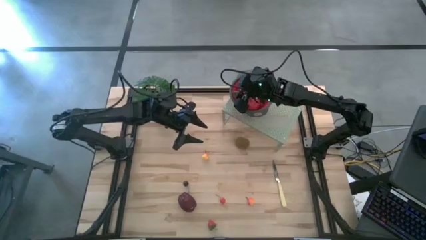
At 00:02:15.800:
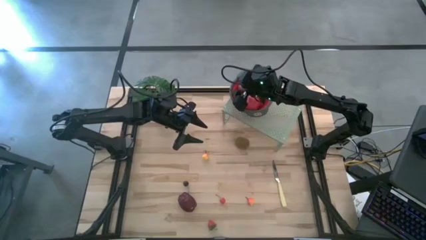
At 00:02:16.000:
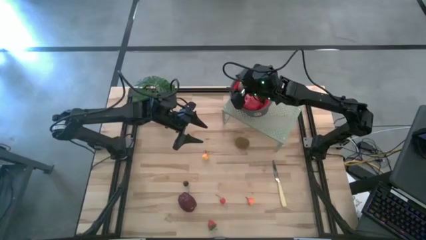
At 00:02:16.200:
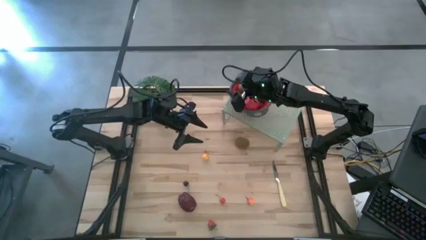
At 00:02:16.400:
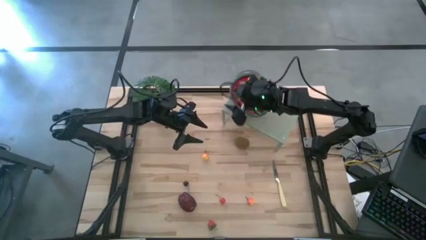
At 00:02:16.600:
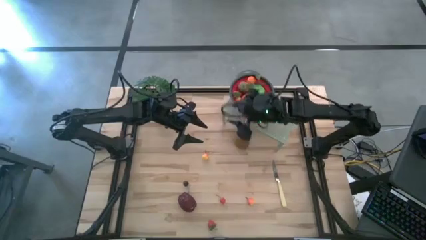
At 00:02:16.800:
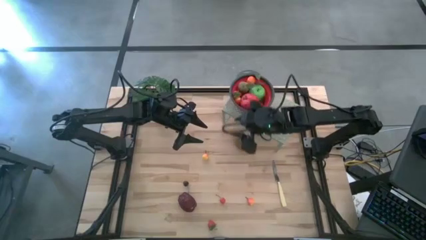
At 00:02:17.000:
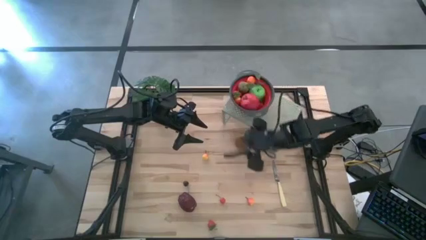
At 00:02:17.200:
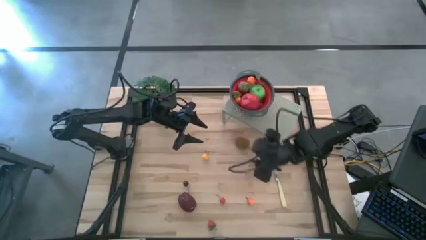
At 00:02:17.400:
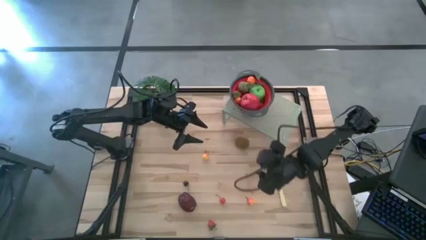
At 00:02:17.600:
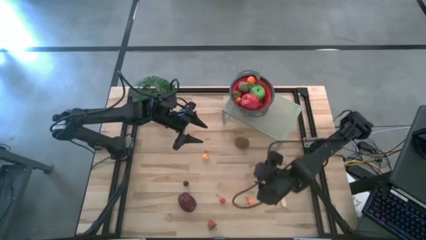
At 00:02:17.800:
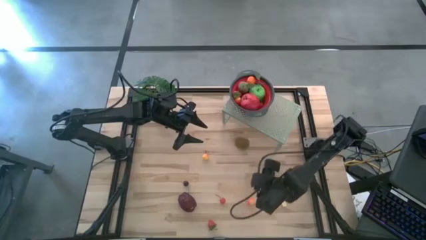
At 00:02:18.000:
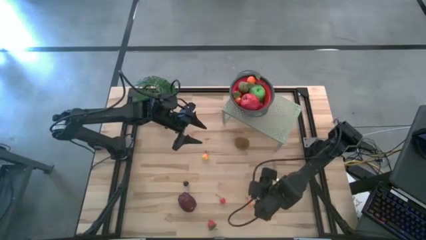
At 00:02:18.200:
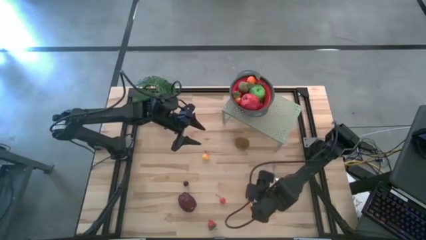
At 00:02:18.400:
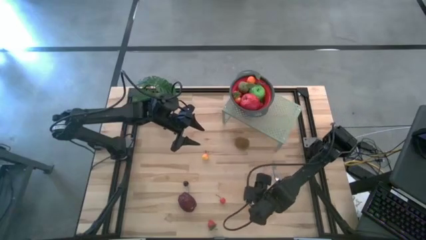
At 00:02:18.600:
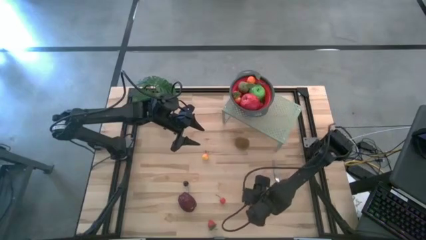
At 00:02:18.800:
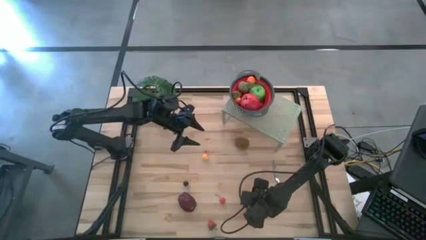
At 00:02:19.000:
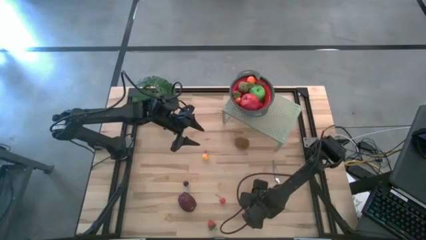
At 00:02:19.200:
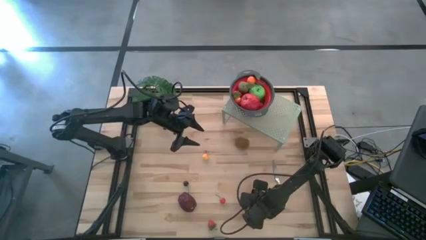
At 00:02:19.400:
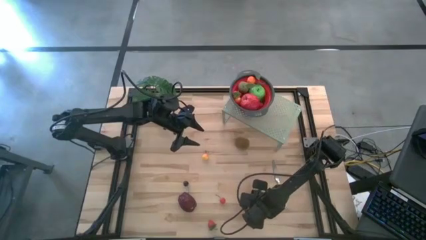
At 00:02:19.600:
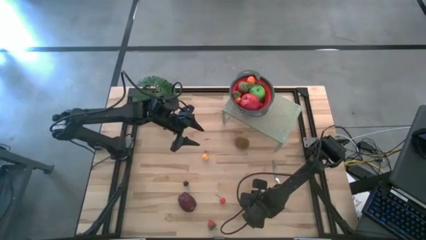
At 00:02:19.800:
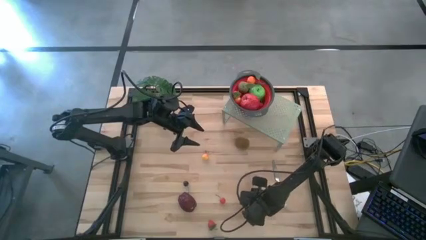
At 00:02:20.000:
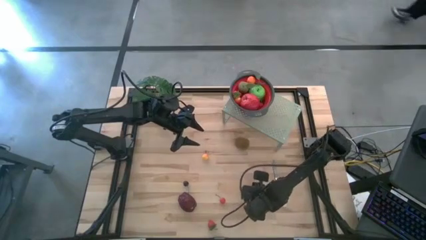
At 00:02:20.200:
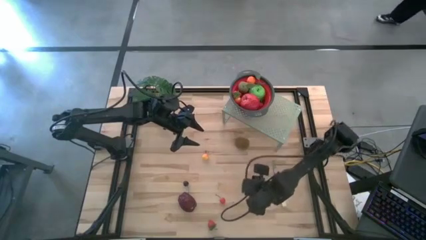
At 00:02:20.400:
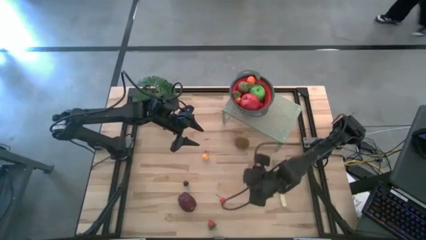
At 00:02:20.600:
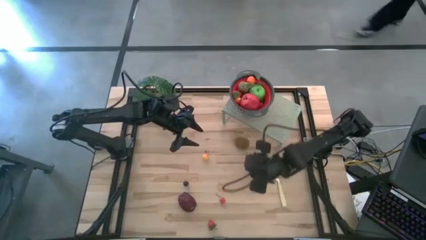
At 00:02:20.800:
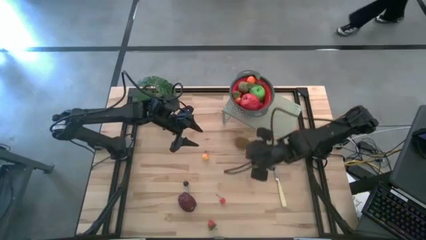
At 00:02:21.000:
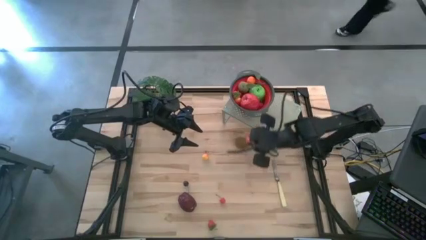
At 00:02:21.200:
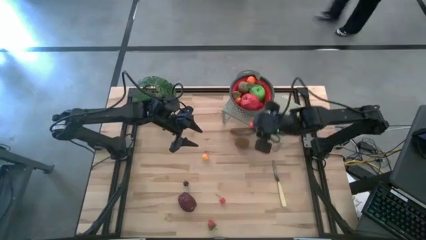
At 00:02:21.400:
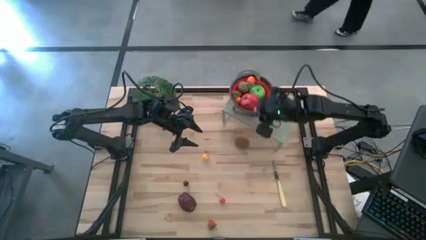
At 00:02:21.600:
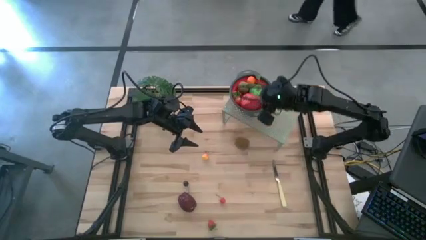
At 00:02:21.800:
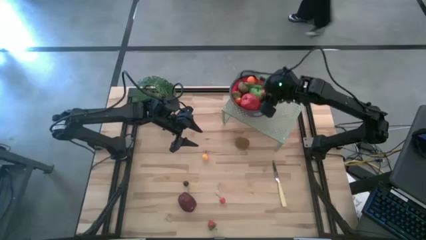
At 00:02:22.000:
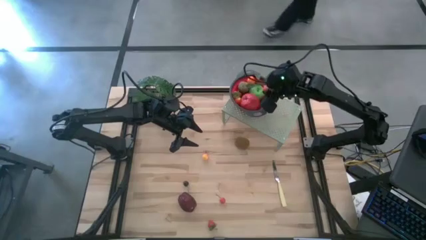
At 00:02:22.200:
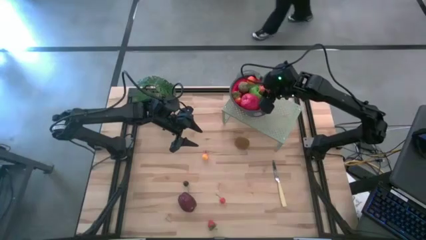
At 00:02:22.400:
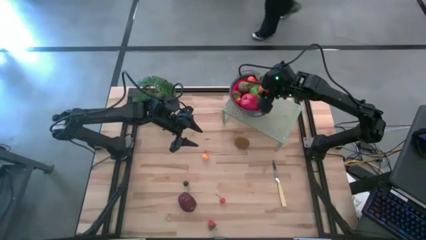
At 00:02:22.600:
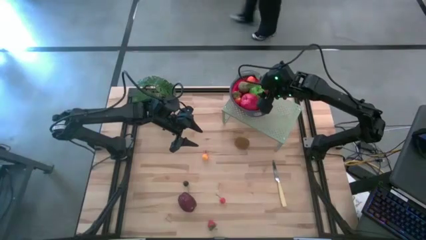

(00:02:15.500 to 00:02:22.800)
Task: Pick & Place Fruit
Put the yellow pear into the red strainer bowl

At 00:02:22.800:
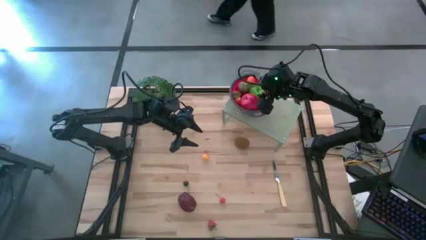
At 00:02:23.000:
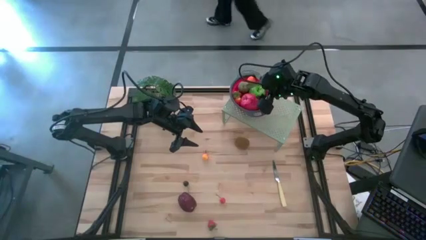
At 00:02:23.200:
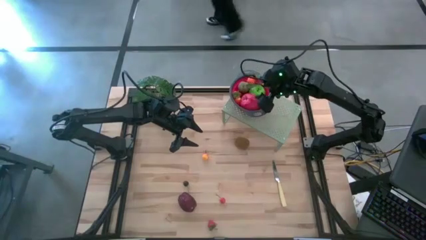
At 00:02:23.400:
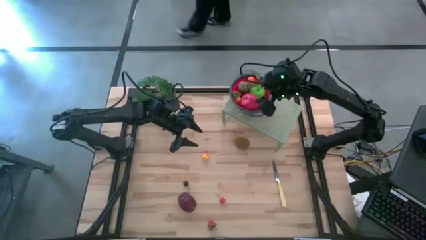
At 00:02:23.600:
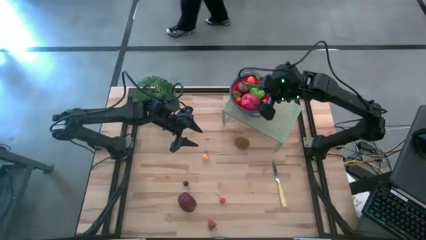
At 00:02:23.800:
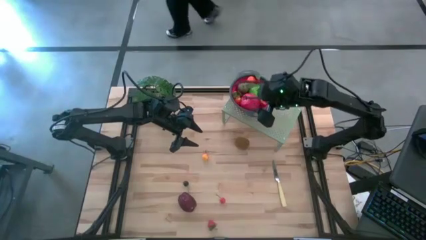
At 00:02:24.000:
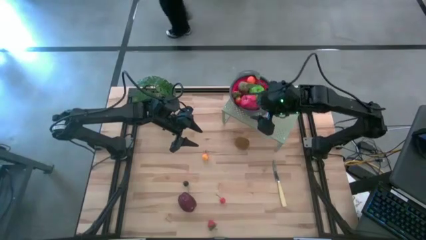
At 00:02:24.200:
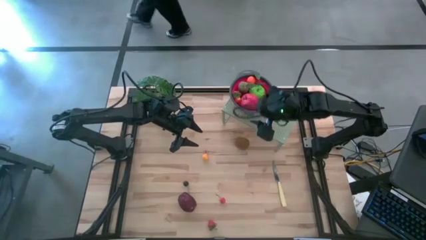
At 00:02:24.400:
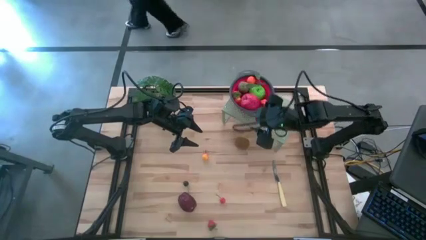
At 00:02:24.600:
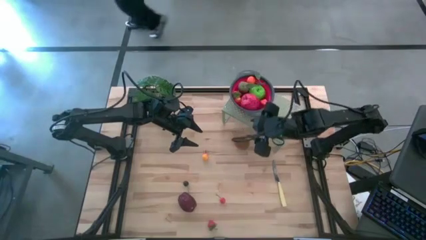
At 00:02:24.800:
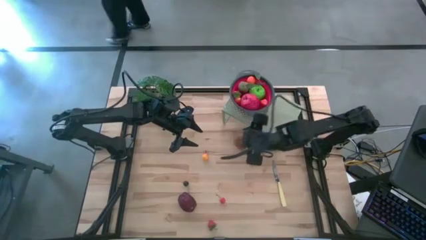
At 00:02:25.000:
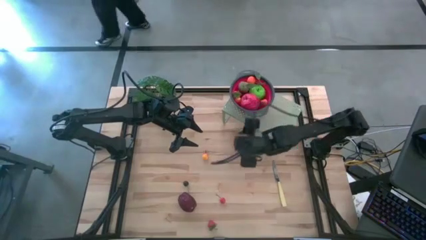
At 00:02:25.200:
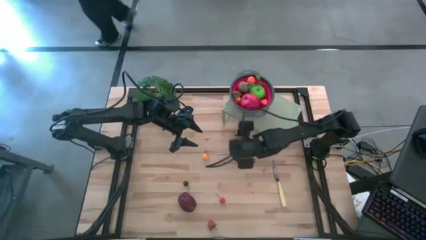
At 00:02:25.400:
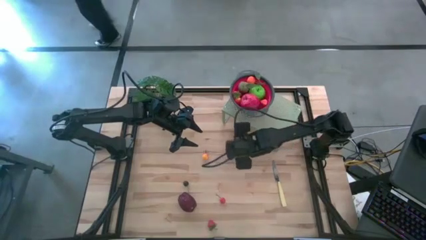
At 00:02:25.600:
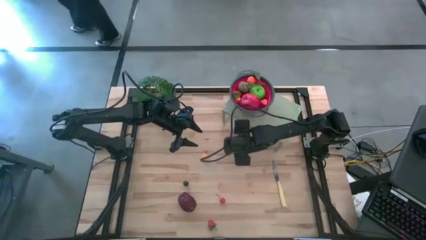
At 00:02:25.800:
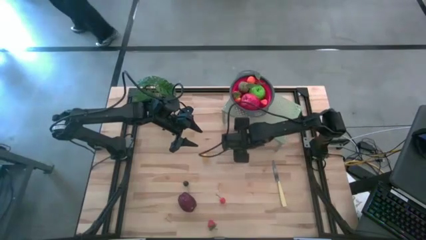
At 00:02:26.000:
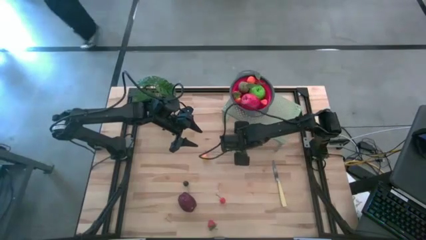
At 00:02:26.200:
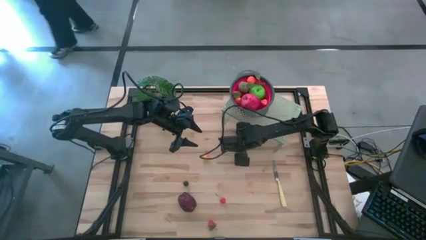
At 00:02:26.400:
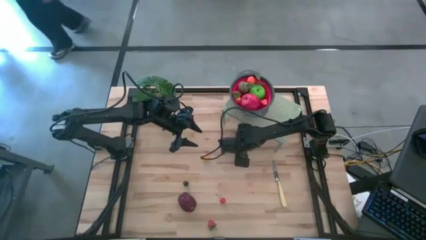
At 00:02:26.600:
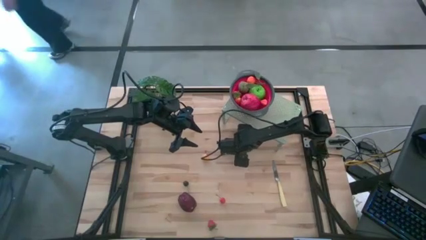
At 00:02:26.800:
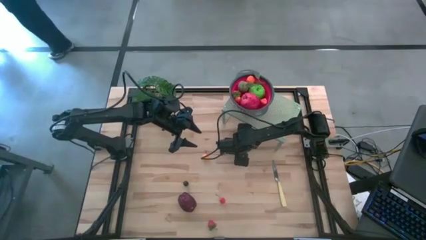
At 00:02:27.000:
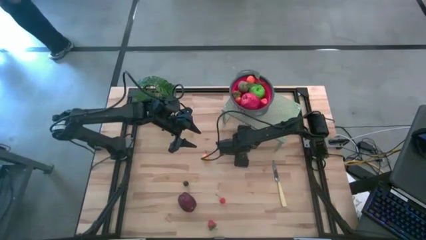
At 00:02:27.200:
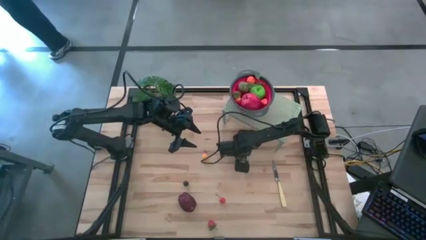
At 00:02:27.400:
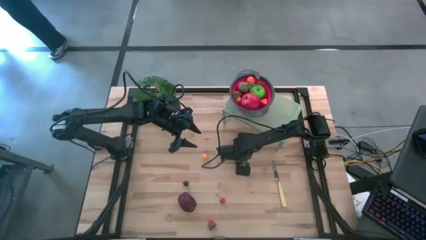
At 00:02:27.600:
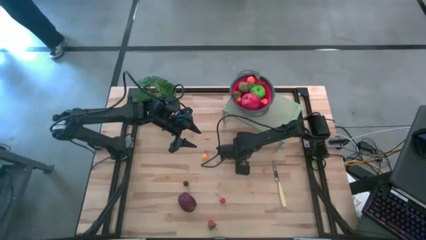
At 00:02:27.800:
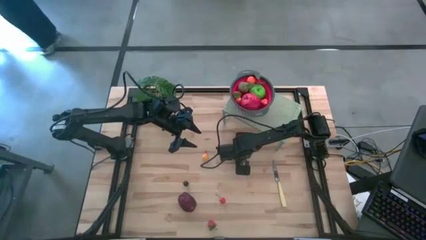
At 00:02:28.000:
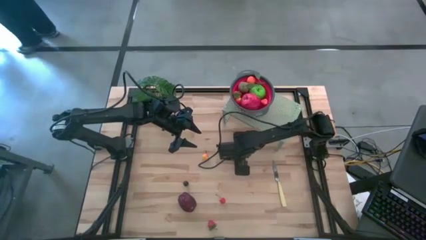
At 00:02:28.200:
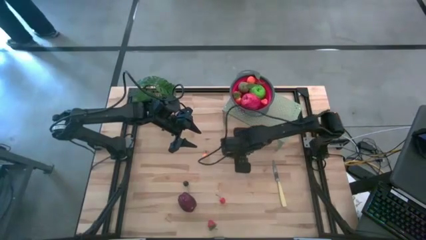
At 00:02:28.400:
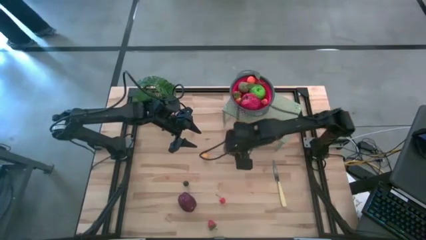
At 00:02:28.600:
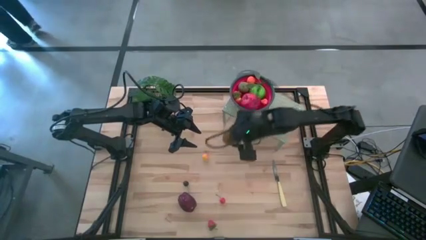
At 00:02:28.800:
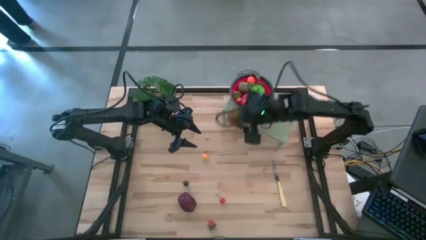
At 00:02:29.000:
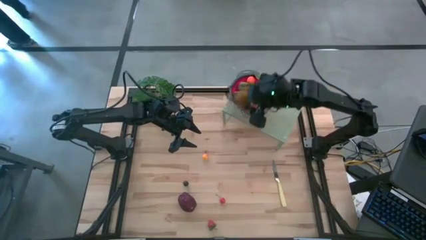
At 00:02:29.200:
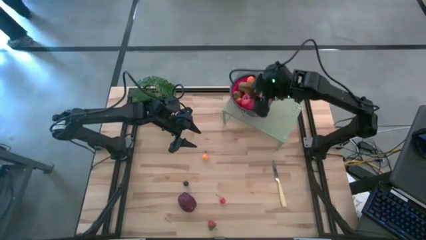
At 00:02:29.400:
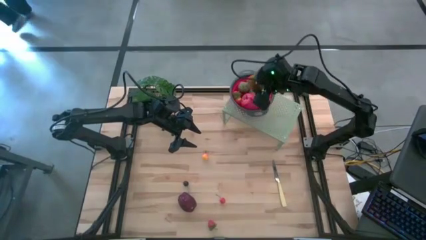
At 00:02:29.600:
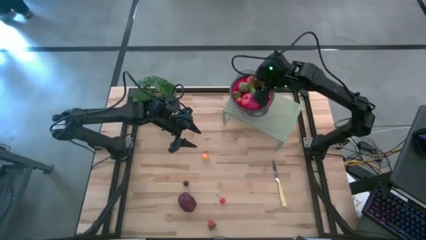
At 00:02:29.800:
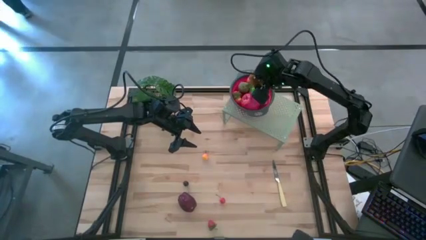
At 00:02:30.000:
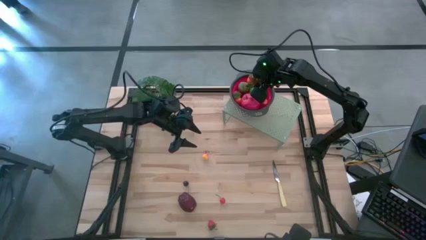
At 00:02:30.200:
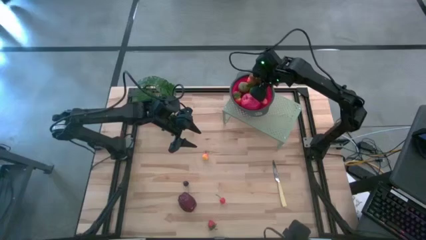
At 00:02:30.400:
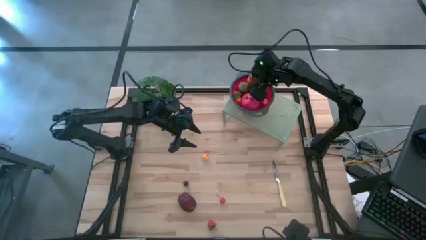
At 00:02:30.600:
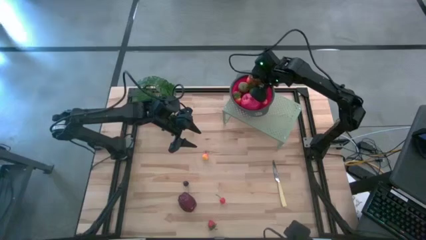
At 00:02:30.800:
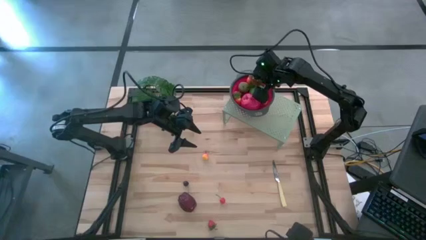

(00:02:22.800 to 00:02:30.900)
Put the green kiwi into the red strainer bowl
